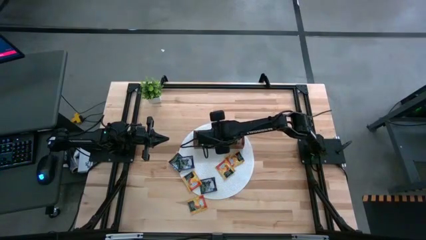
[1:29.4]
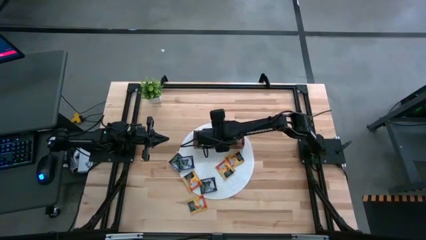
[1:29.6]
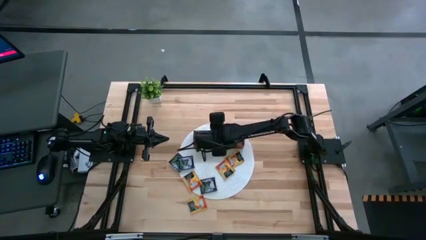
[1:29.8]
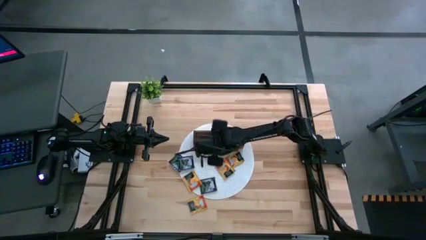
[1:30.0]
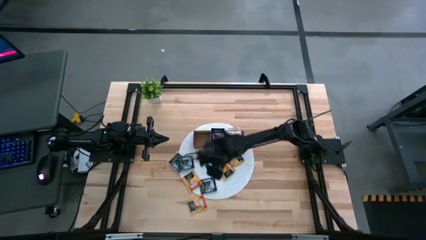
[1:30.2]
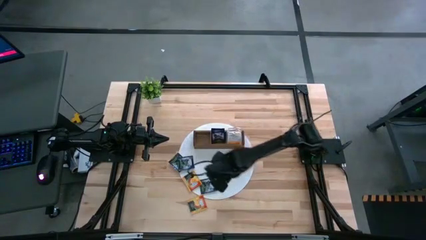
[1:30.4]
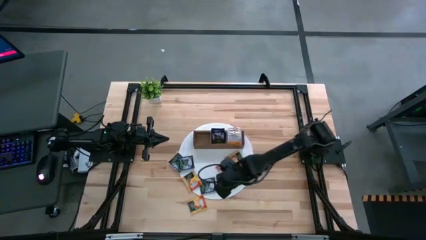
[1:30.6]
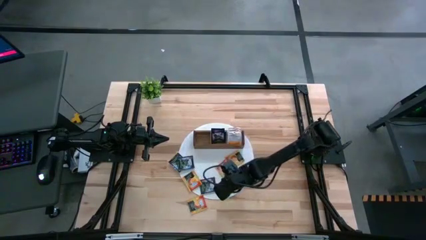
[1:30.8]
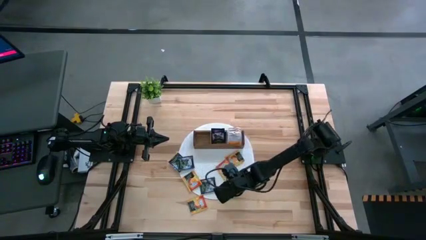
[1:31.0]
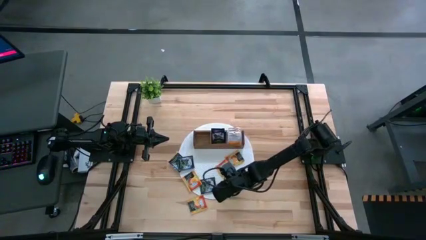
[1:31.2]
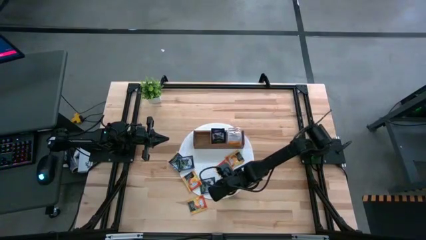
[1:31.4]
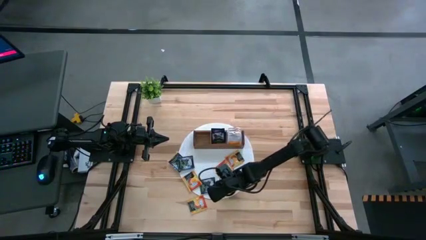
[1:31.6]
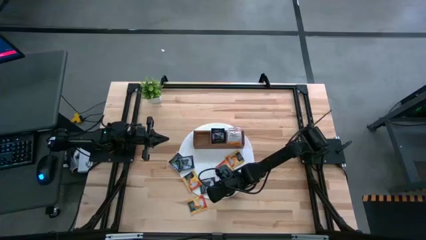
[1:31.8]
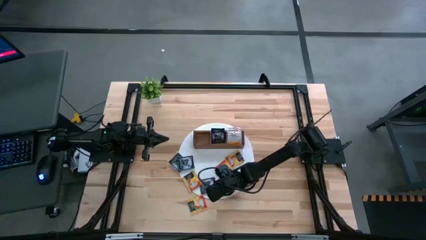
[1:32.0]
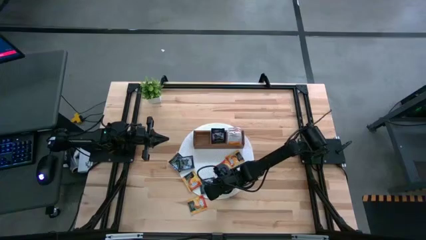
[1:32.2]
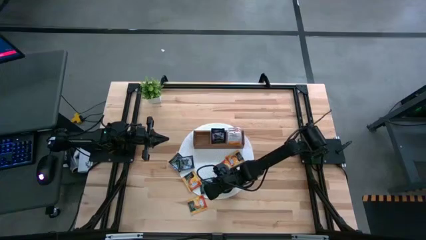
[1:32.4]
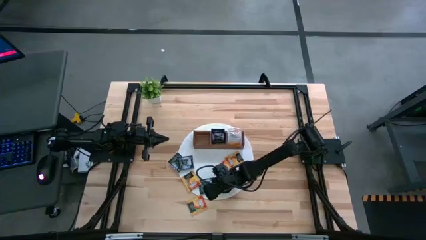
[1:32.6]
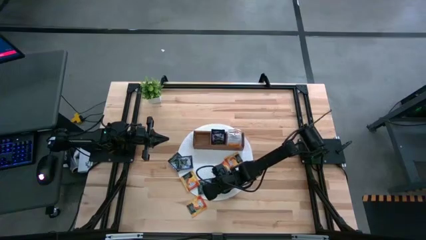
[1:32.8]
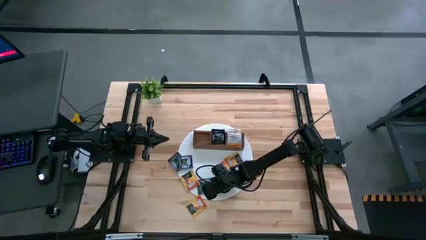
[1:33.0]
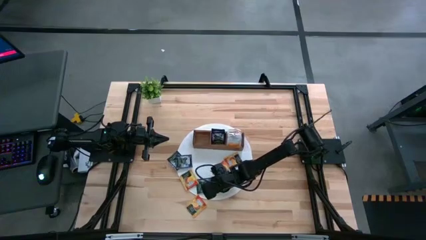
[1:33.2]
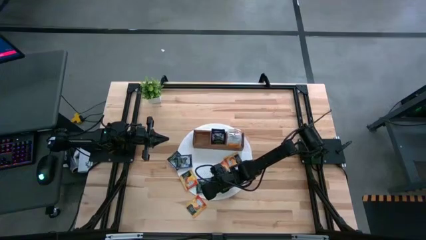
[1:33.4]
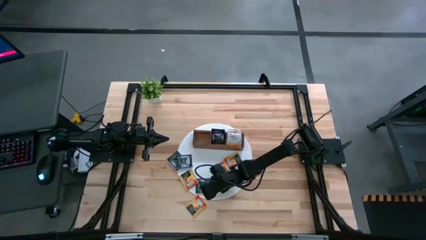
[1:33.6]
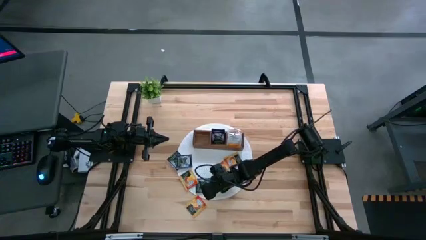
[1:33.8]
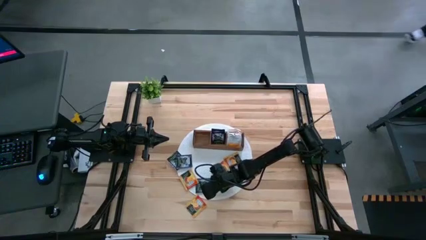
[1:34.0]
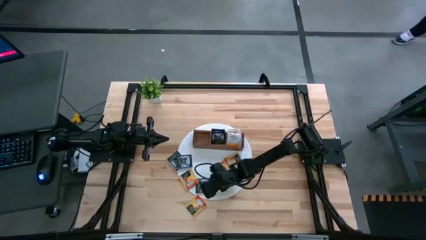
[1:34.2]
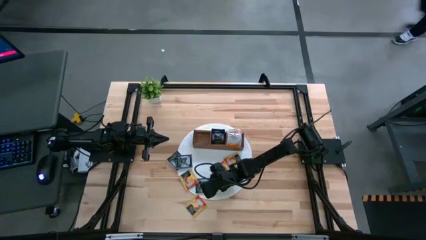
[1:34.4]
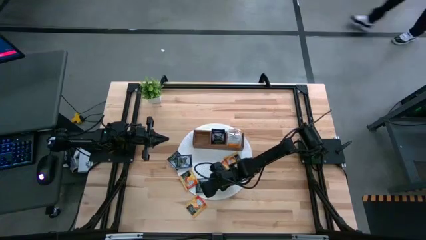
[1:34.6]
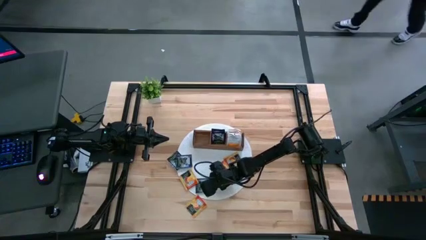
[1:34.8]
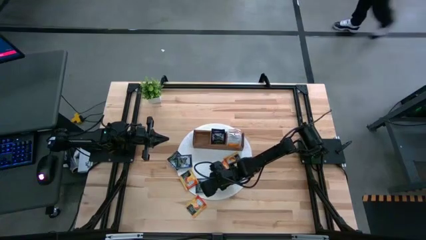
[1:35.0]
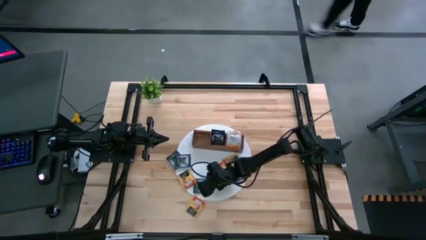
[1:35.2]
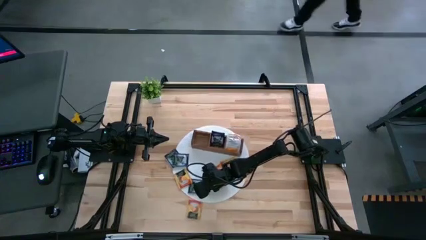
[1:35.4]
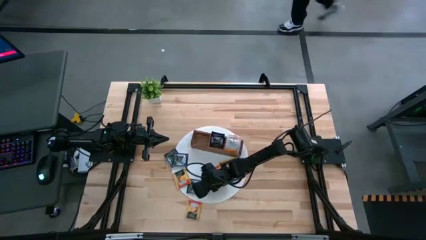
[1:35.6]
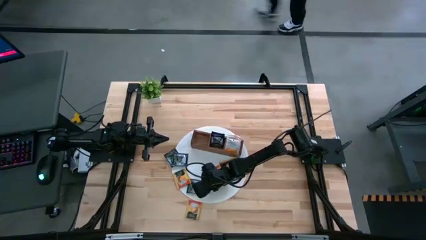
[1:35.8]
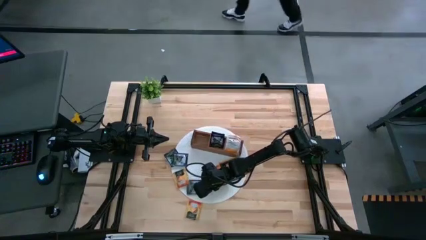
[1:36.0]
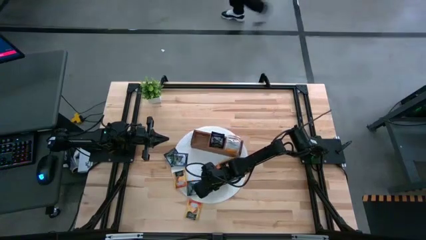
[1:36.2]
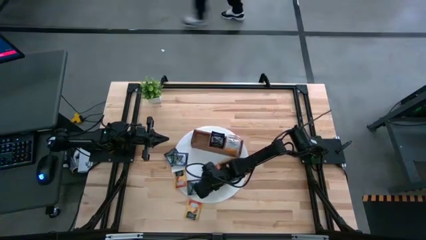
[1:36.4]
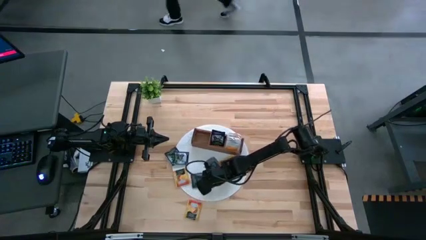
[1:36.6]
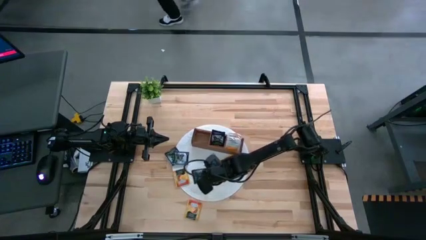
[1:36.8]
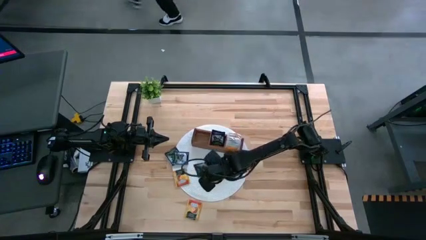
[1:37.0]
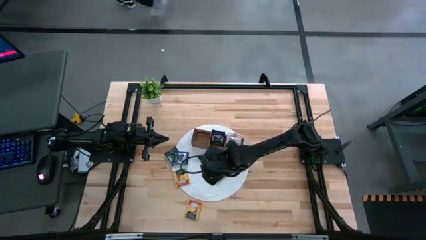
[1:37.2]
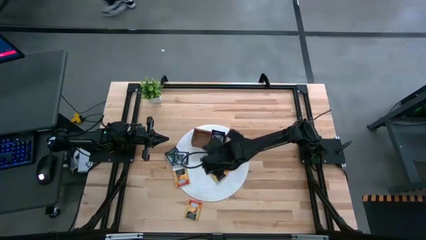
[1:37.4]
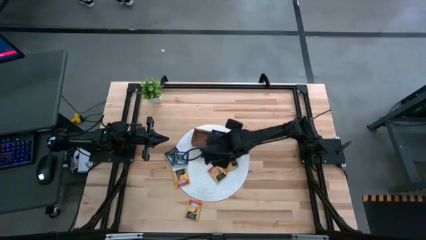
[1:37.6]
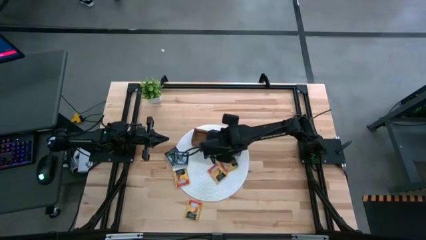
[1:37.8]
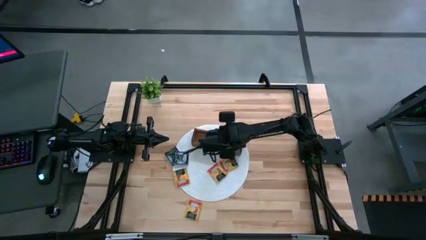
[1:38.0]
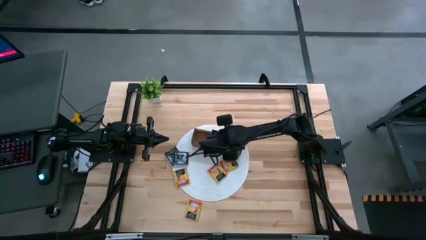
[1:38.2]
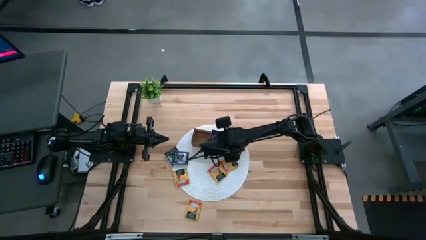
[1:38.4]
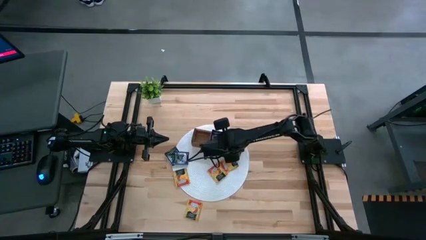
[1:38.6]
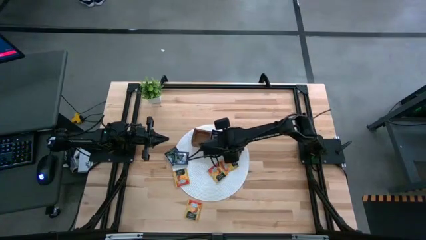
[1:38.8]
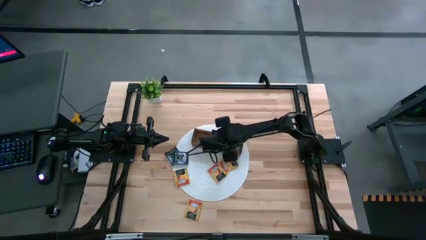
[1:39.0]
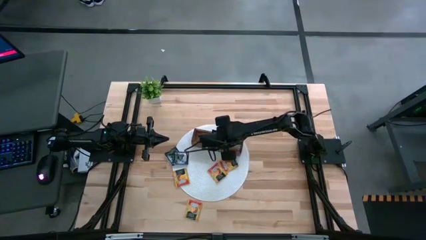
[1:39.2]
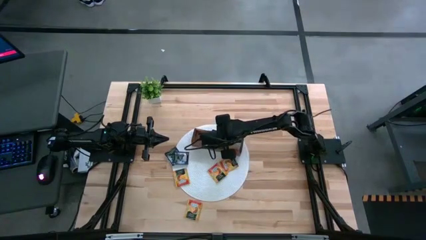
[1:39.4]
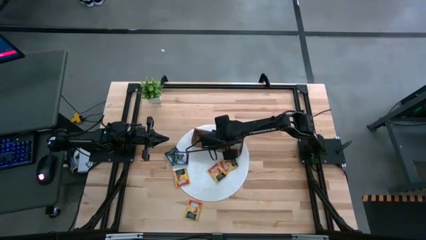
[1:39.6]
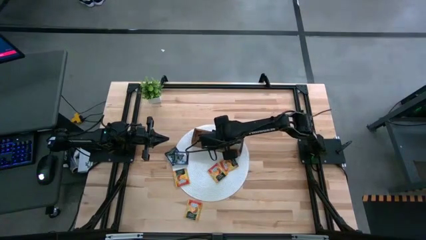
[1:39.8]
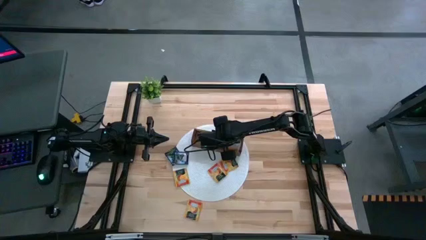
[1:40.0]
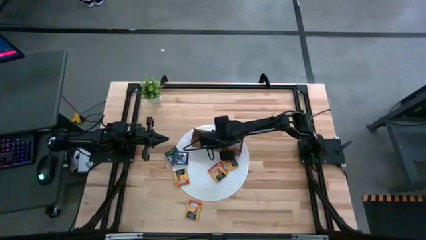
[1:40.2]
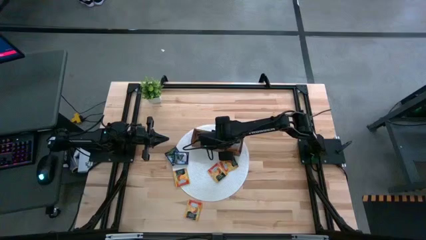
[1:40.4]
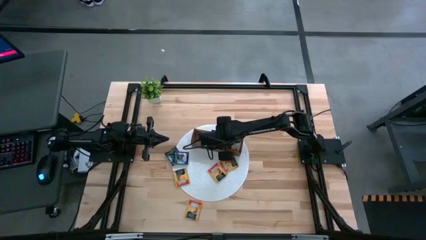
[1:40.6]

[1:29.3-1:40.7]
Task: Pick & Place Tea
Put the blue tea bag into the middle section of the wooden organizer
